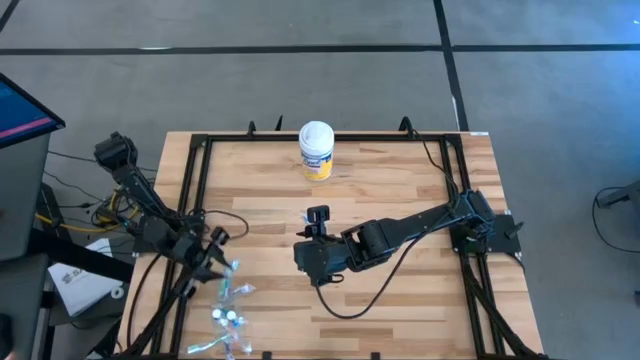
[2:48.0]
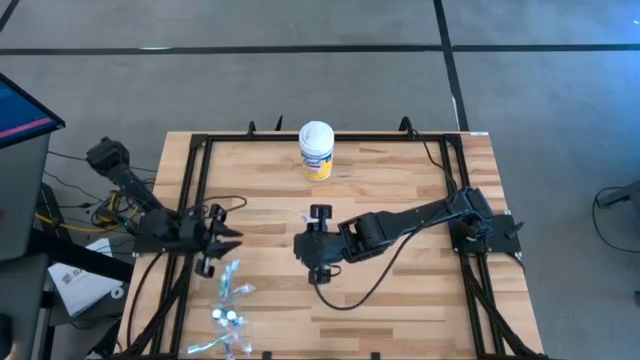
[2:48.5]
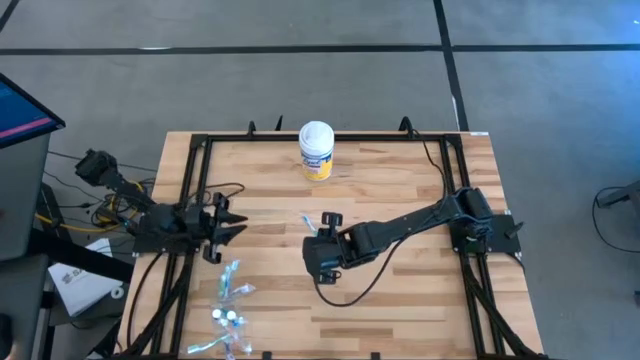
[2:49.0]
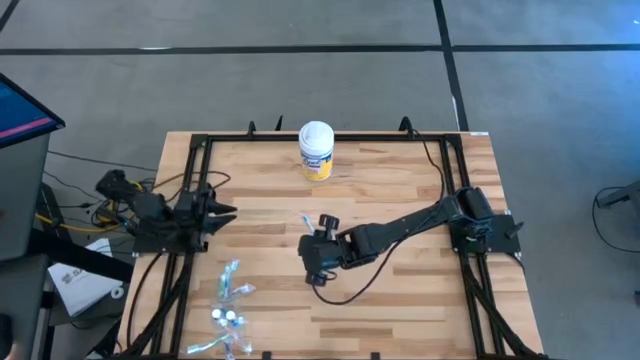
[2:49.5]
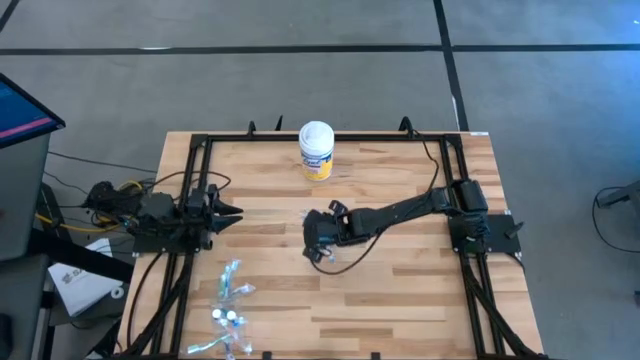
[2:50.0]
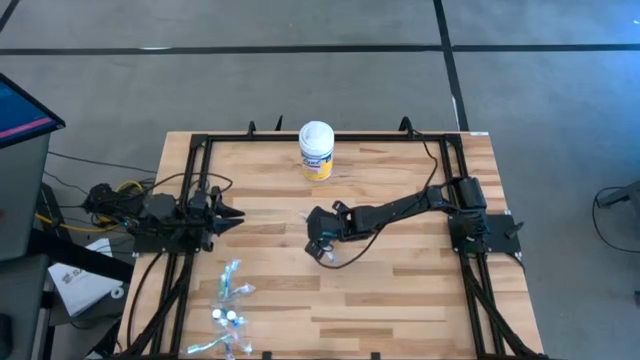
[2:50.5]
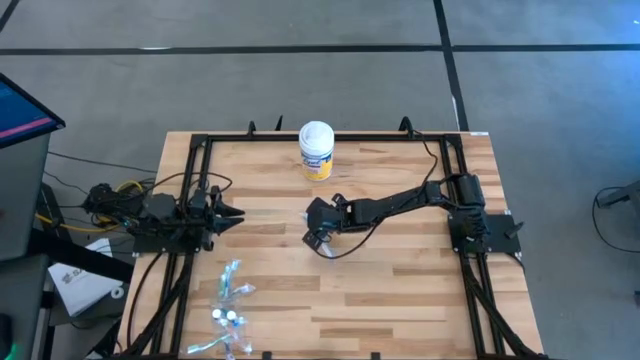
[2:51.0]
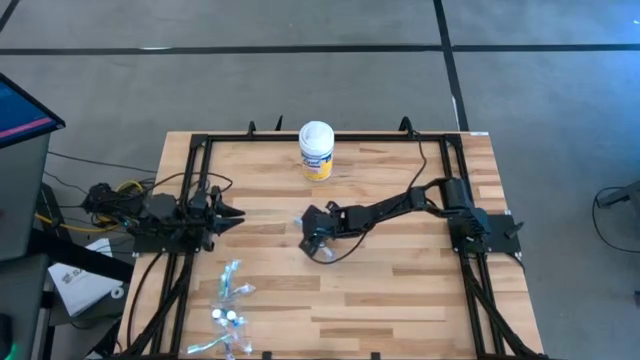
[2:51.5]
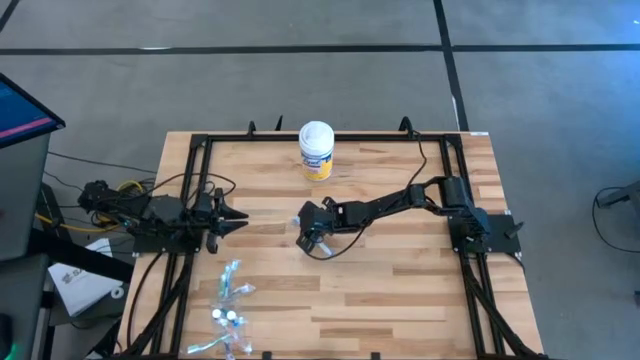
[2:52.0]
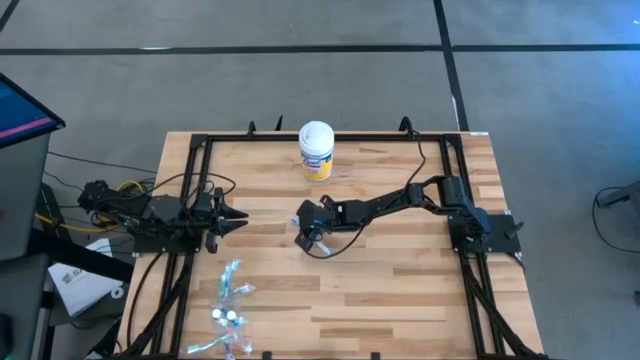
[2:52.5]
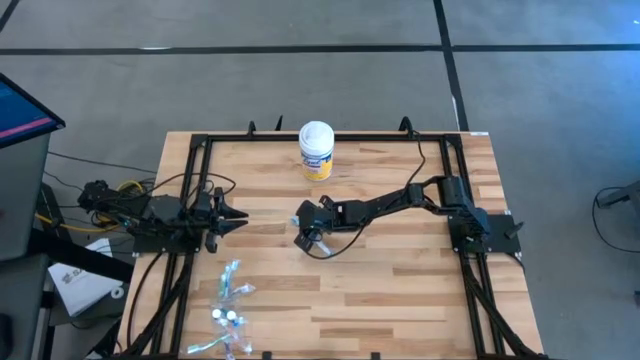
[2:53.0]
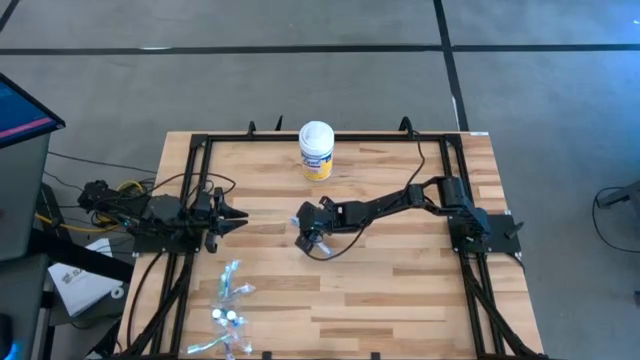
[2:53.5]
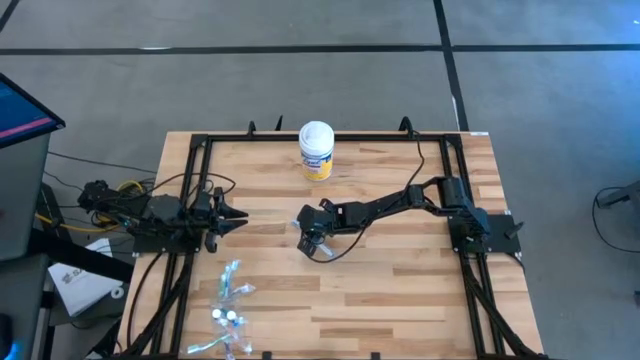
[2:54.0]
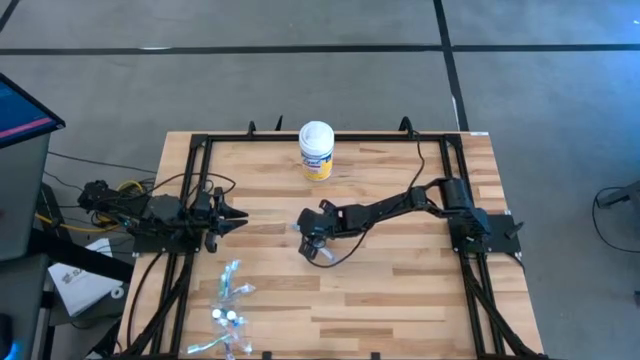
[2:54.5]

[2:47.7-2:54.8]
Task: Pick & Place toothbrushing station
Put the blue toothbrush into the transparent organizer

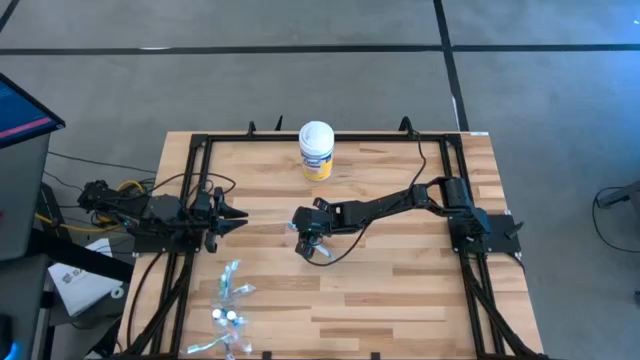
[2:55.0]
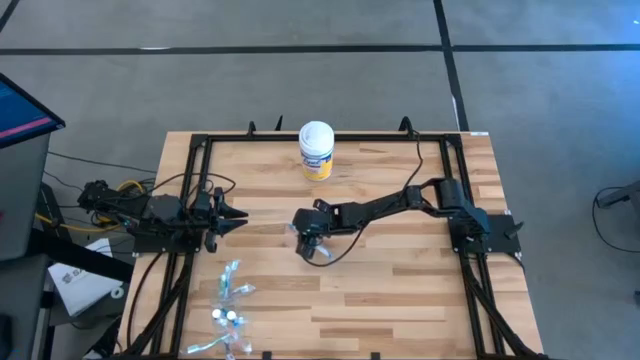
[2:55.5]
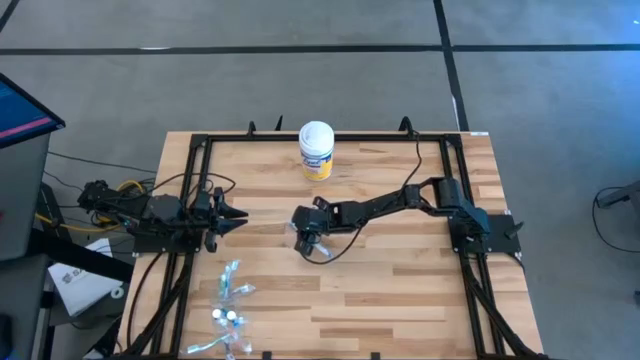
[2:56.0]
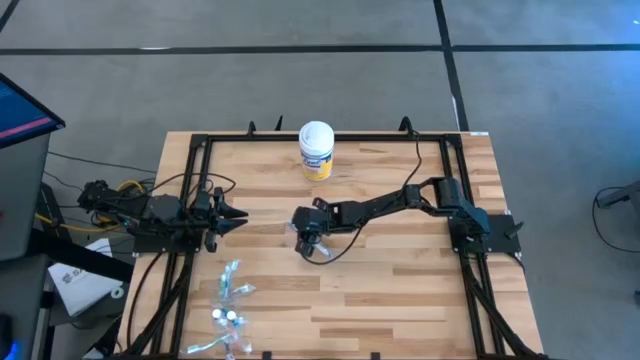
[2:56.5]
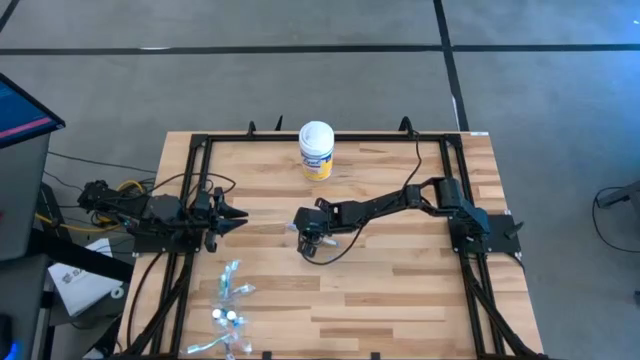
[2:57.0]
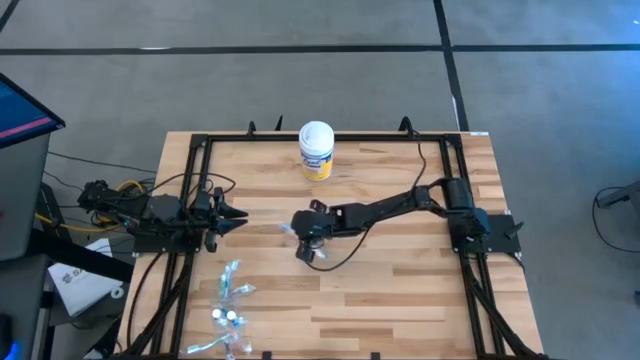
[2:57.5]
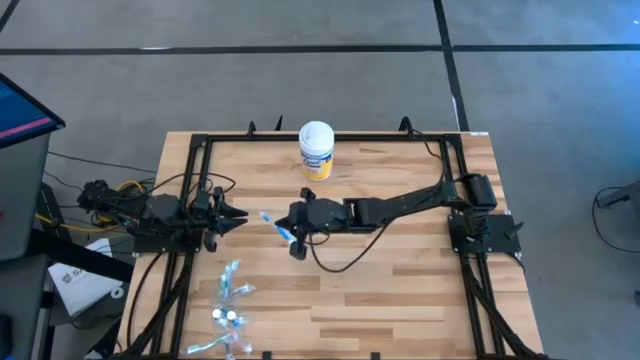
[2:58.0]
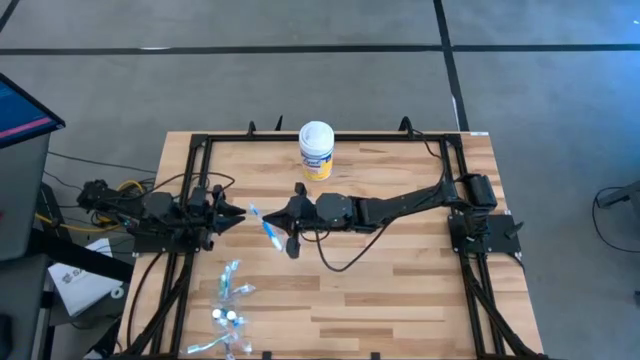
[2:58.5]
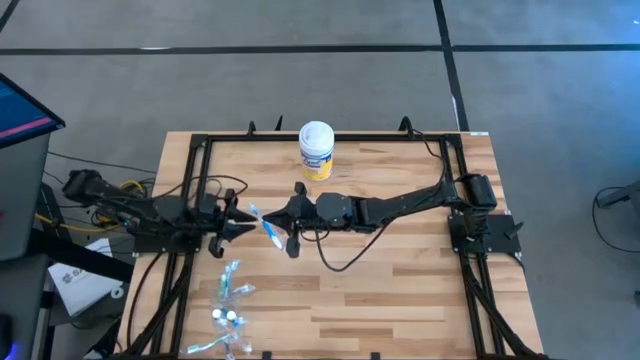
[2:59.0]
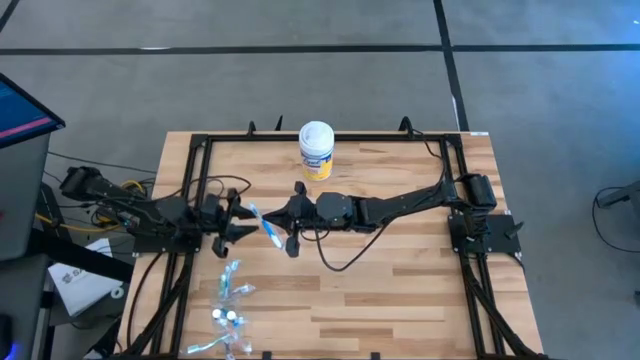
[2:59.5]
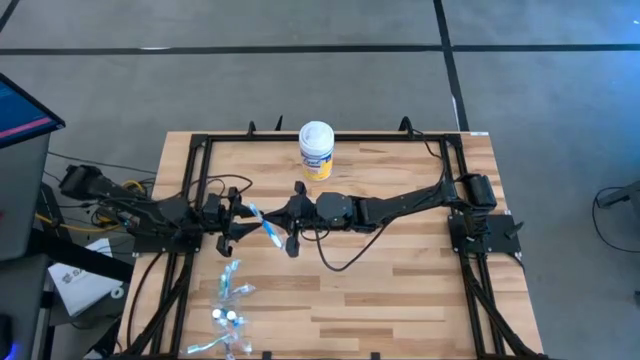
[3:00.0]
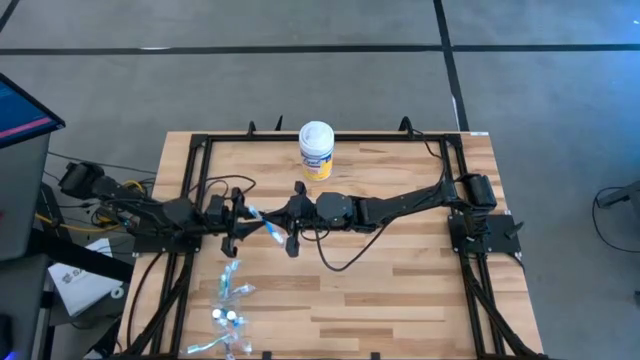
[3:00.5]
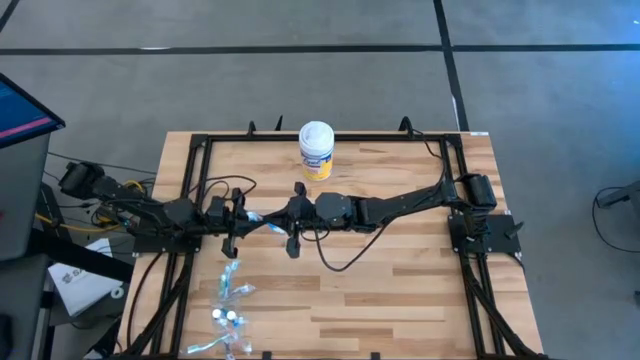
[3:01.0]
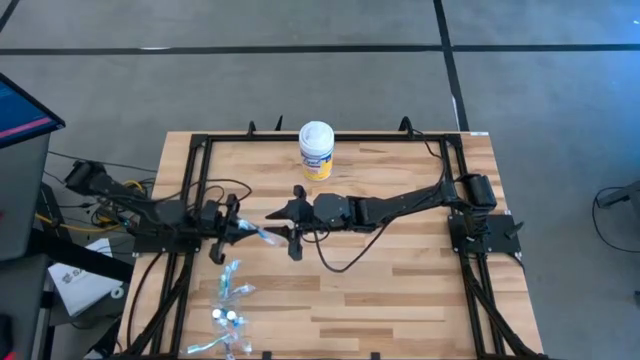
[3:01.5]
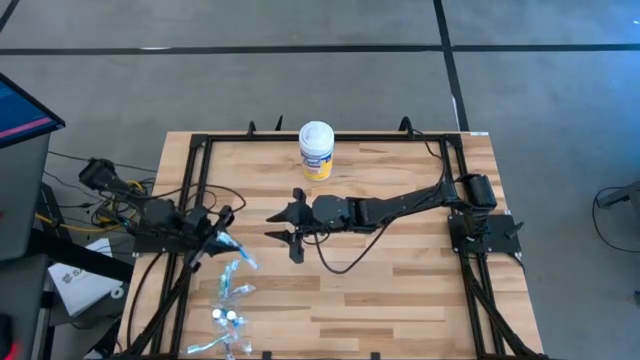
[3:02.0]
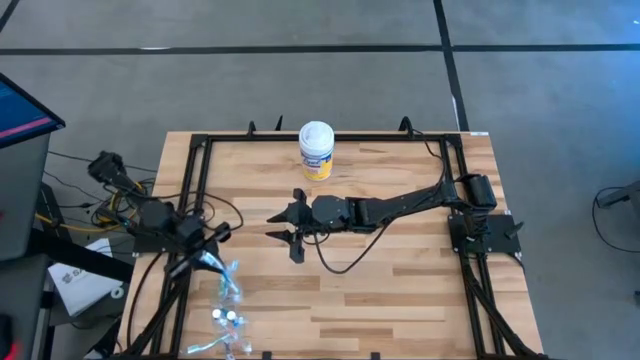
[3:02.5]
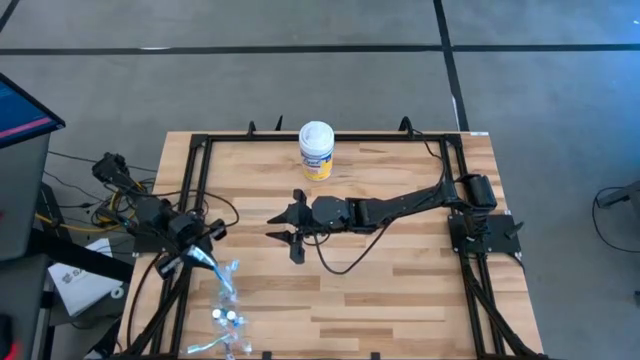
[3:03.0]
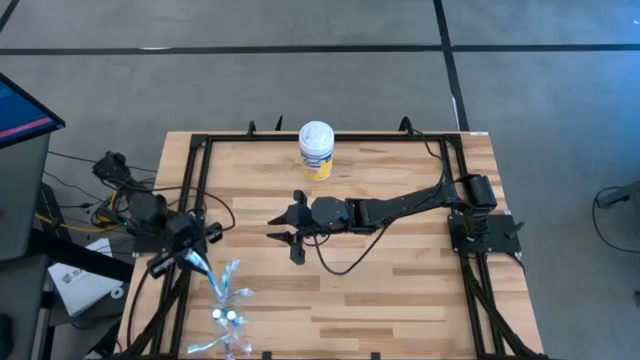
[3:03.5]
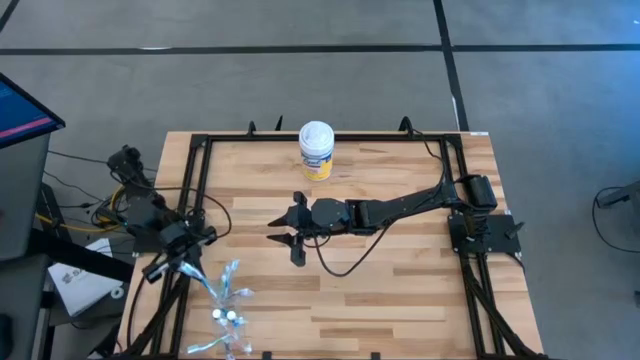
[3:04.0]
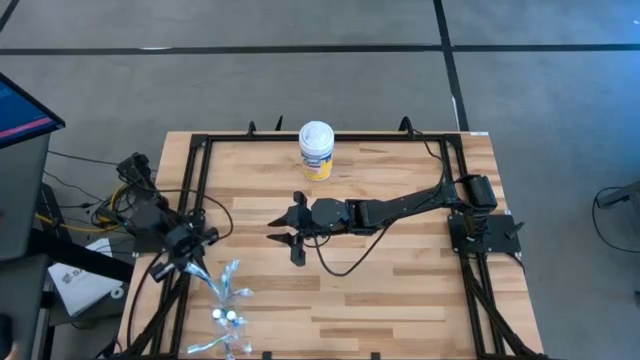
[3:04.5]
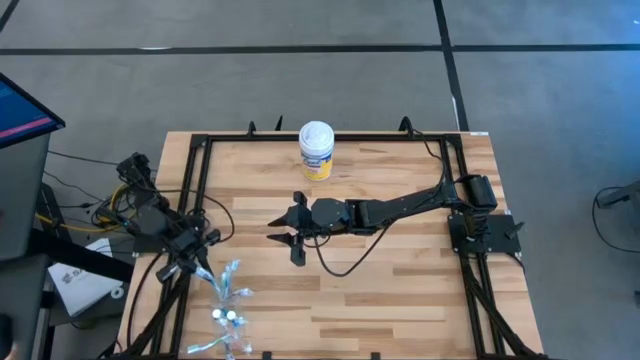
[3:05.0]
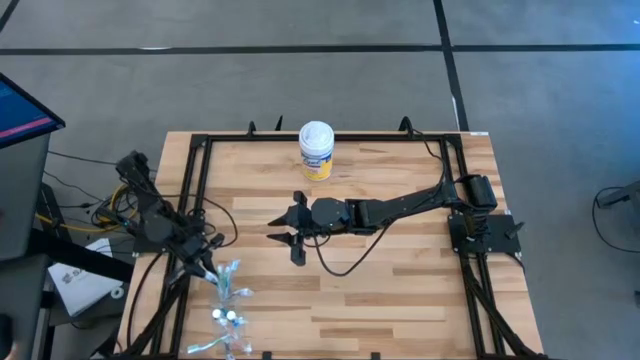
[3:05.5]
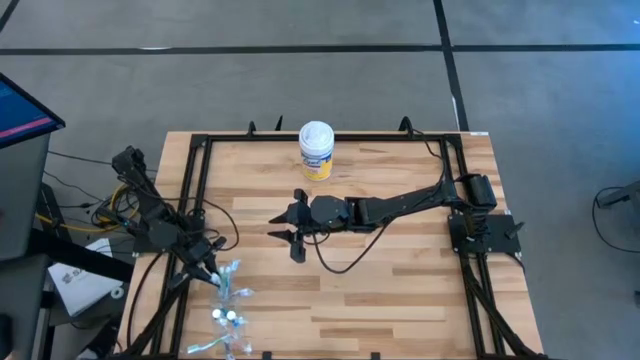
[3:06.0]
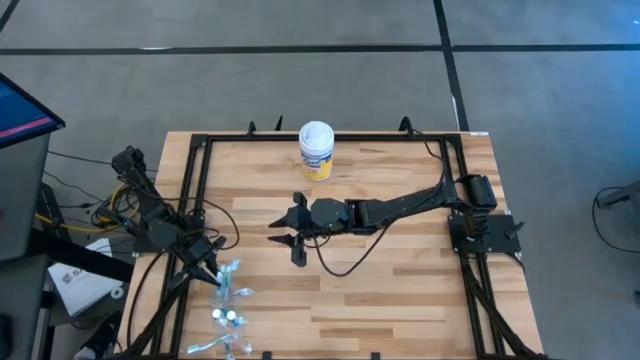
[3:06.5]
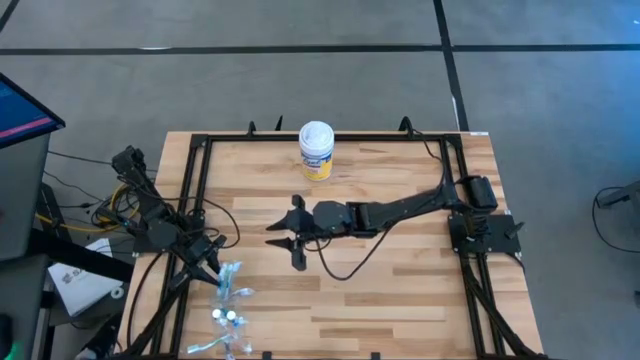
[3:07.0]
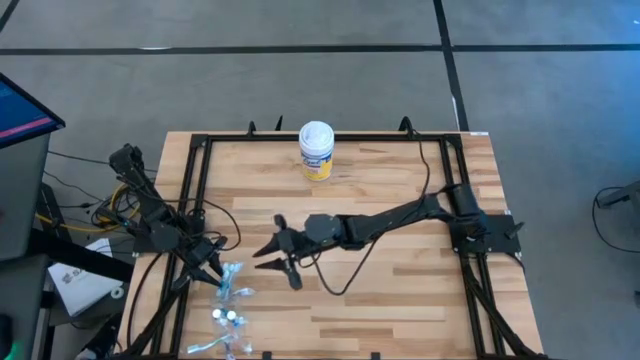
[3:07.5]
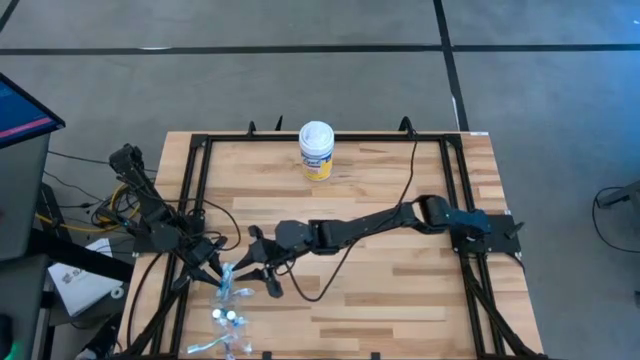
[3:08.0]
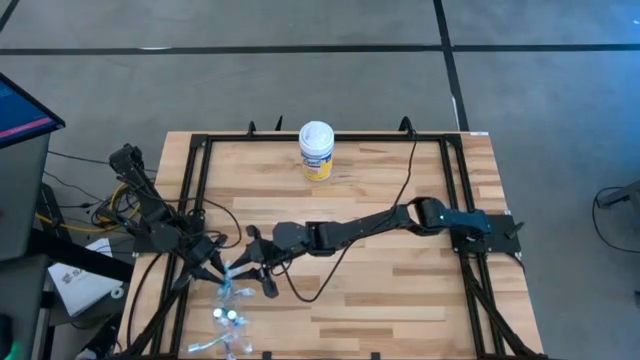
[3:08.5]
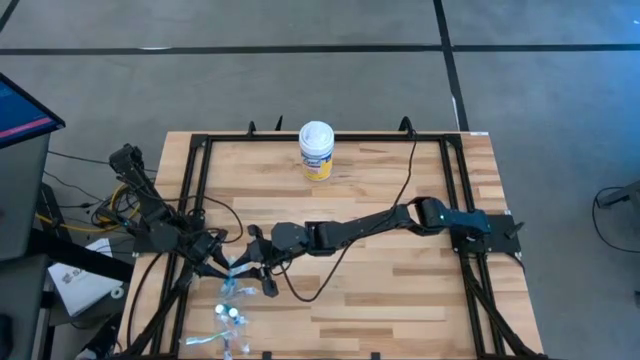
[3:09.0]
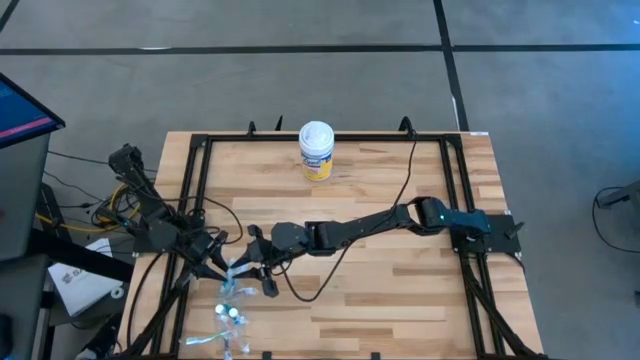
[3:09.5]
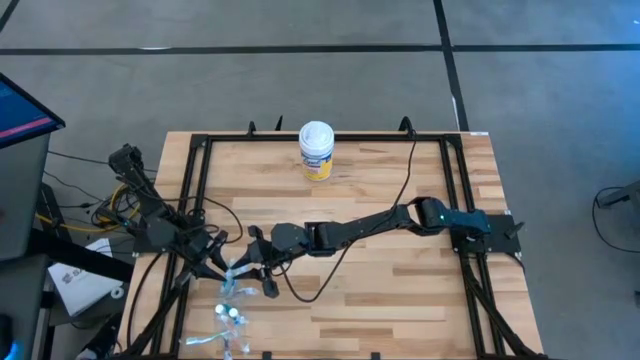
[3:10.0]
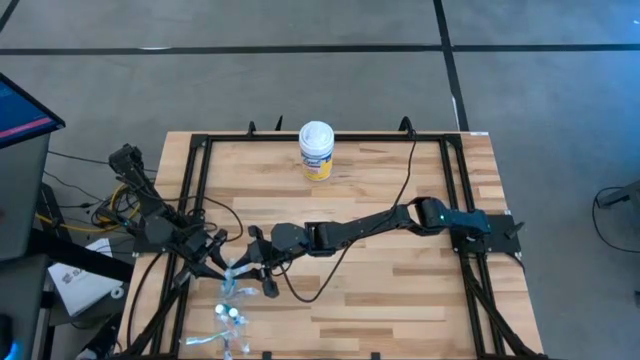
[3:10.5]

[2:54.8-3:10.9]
Put the blue toothbrush into the transparent organizer
